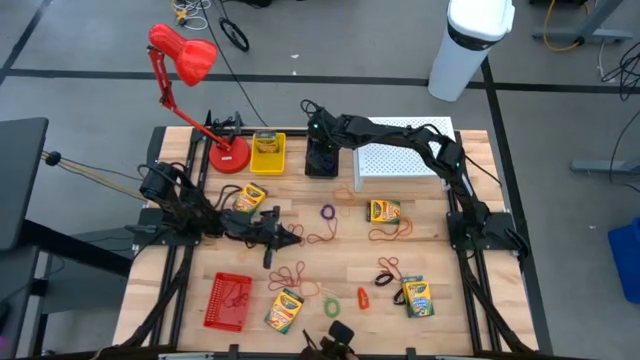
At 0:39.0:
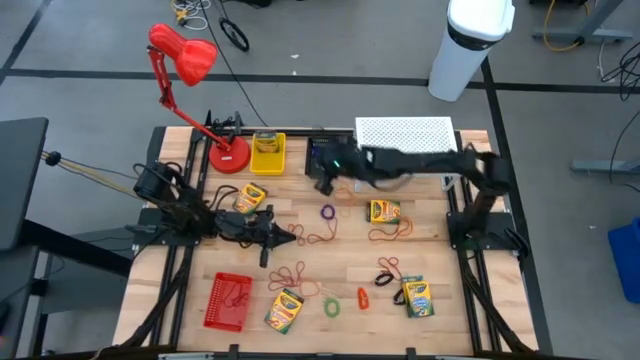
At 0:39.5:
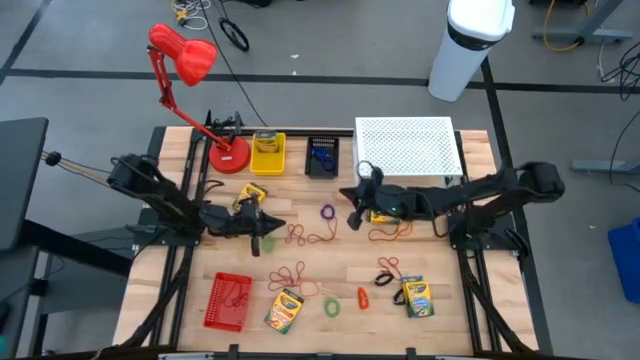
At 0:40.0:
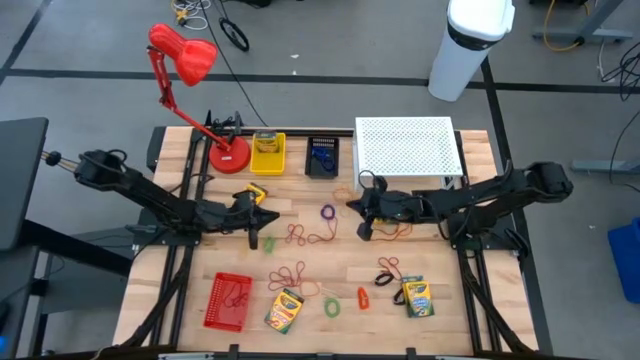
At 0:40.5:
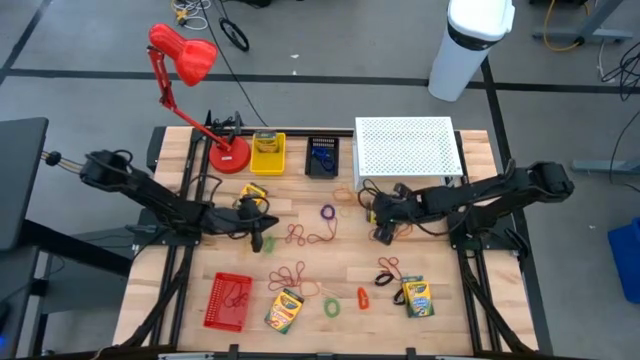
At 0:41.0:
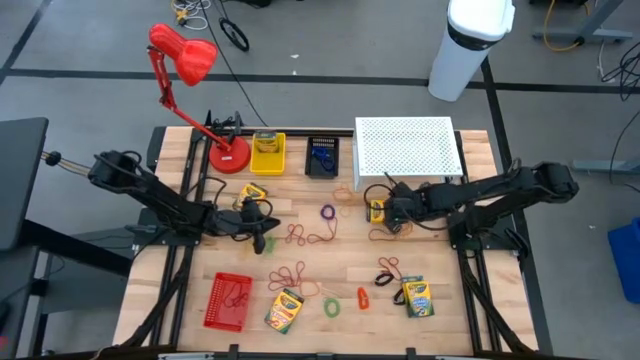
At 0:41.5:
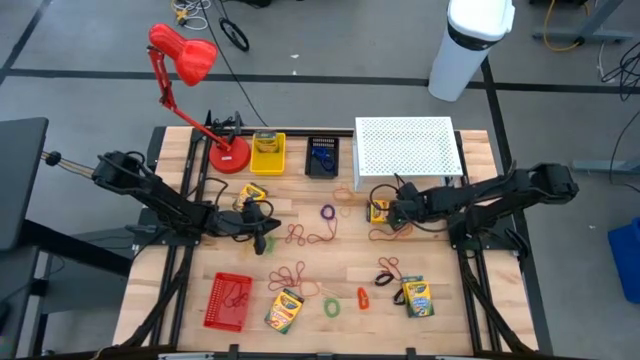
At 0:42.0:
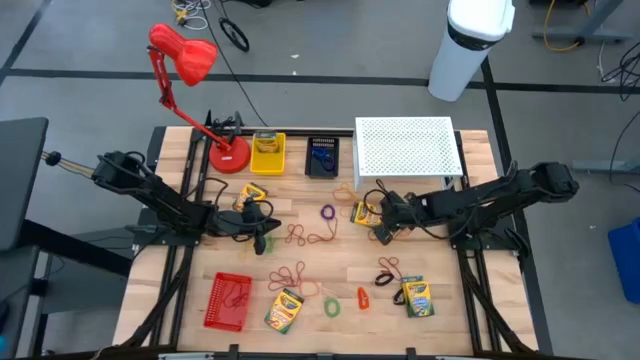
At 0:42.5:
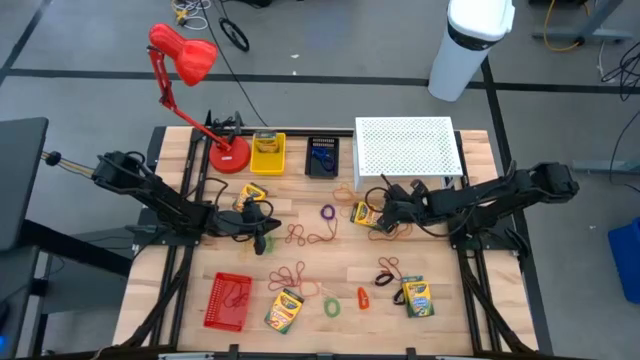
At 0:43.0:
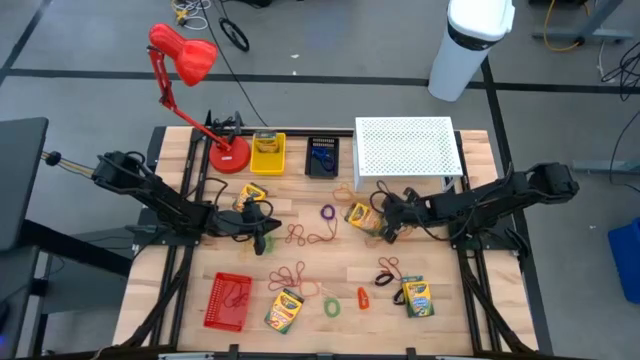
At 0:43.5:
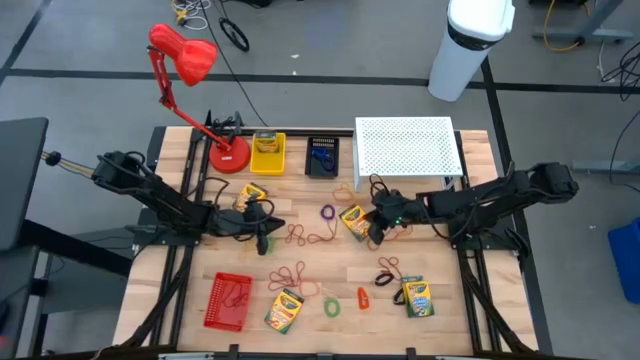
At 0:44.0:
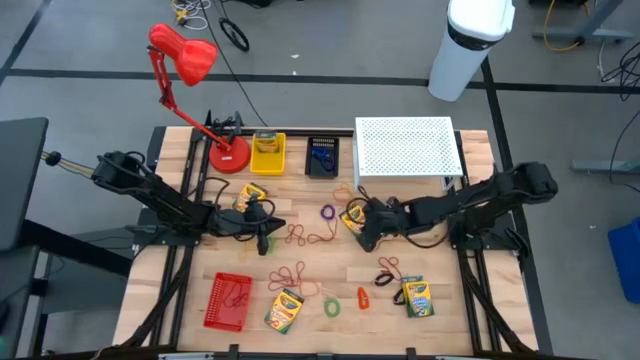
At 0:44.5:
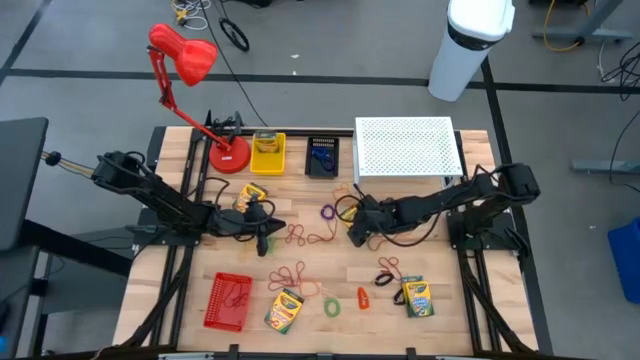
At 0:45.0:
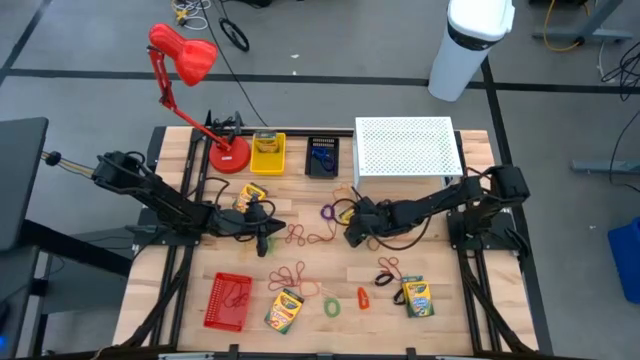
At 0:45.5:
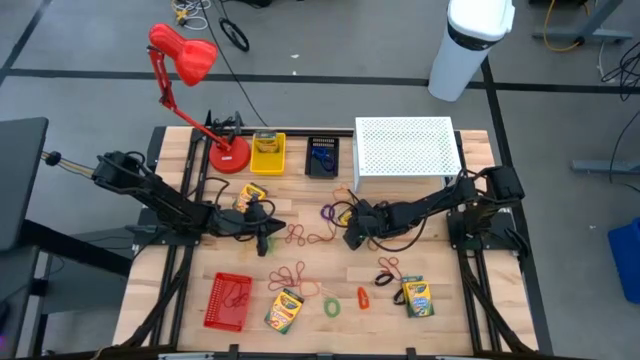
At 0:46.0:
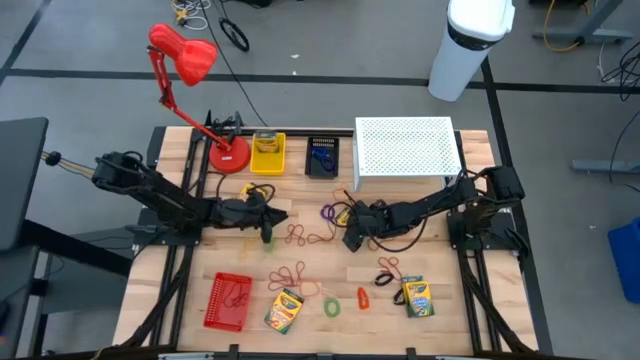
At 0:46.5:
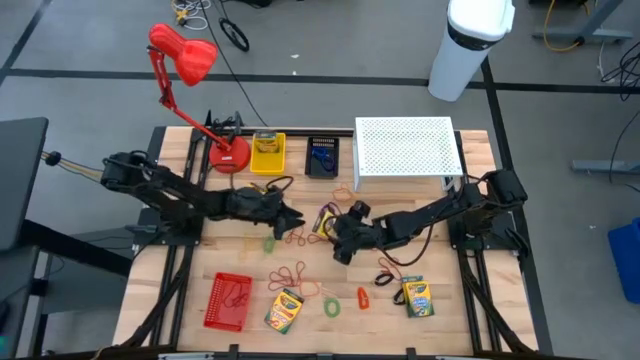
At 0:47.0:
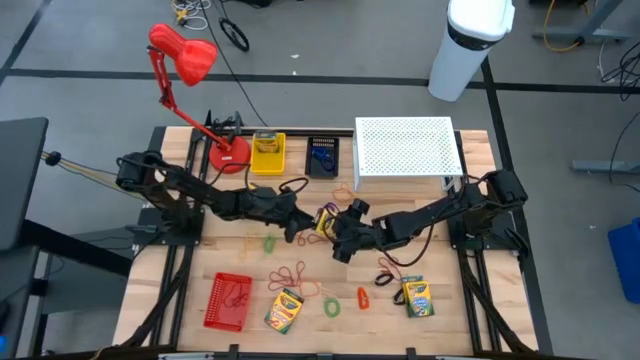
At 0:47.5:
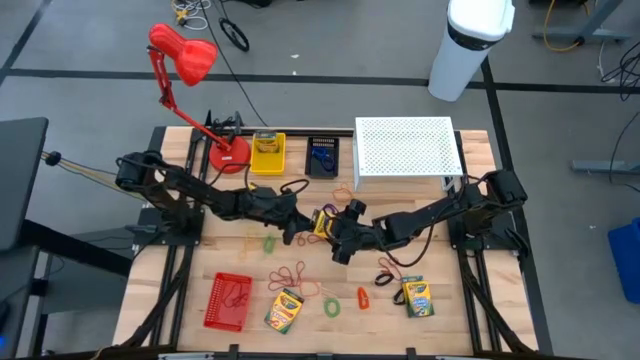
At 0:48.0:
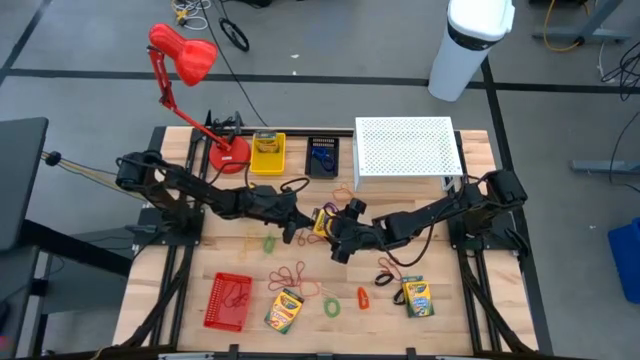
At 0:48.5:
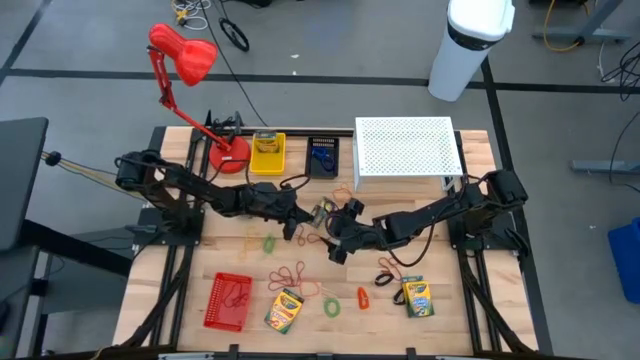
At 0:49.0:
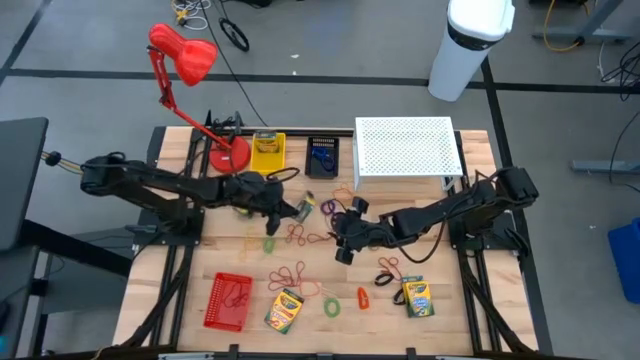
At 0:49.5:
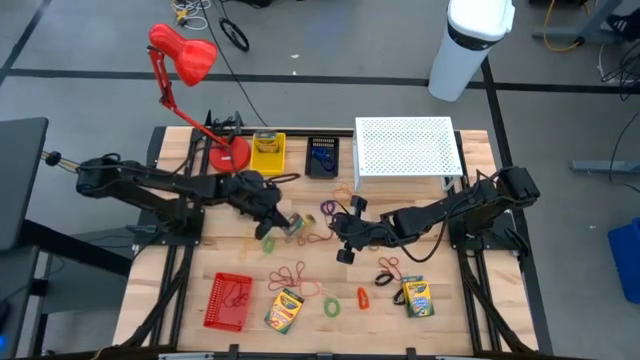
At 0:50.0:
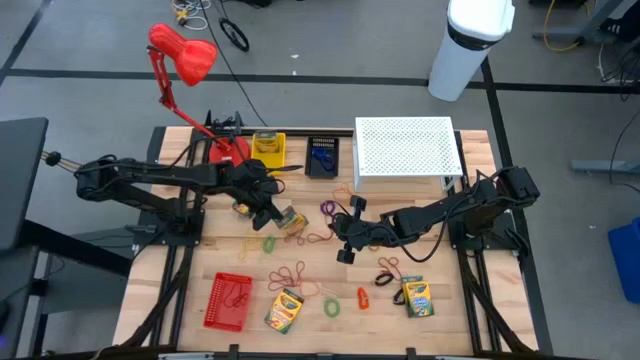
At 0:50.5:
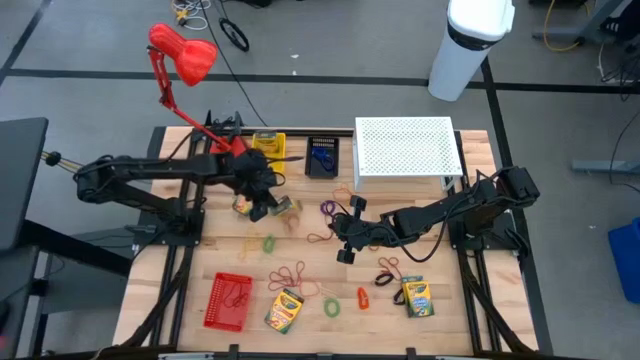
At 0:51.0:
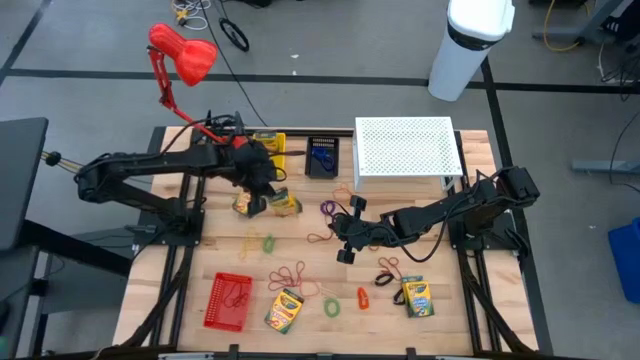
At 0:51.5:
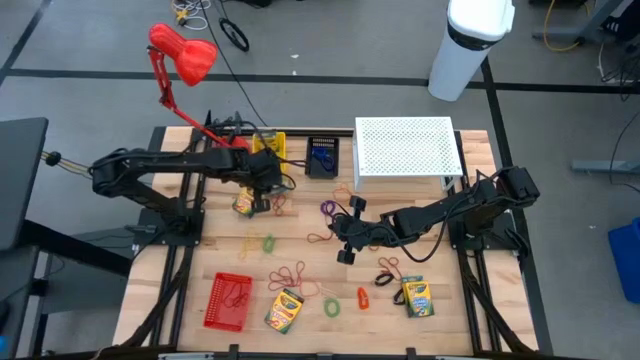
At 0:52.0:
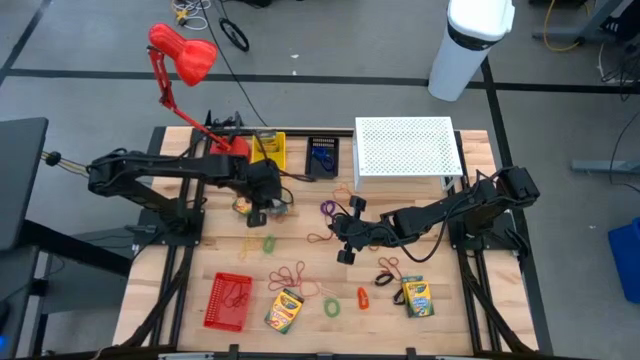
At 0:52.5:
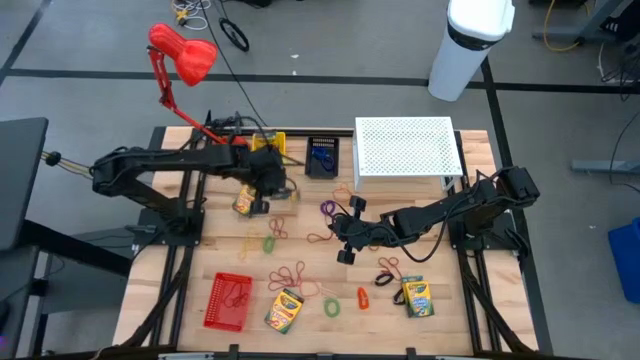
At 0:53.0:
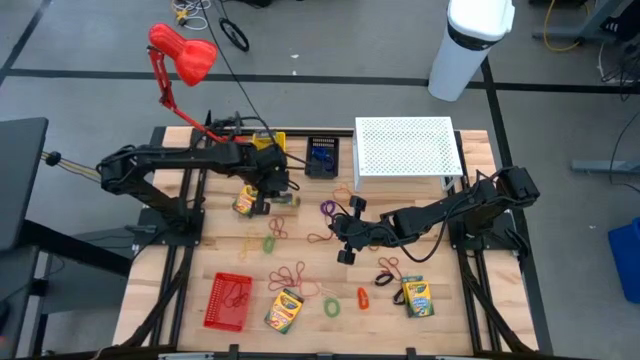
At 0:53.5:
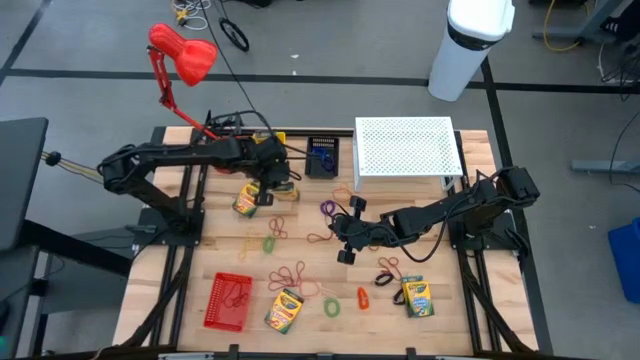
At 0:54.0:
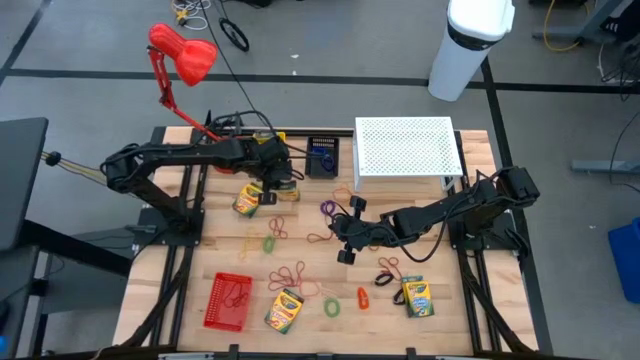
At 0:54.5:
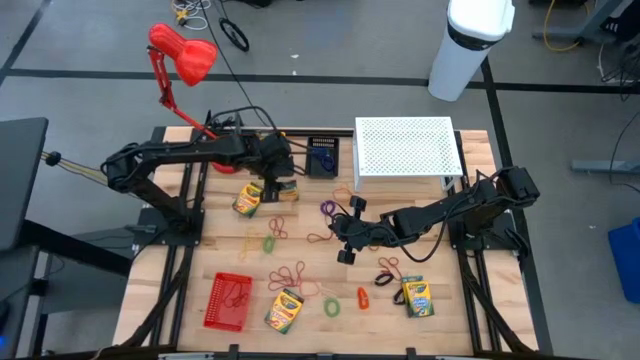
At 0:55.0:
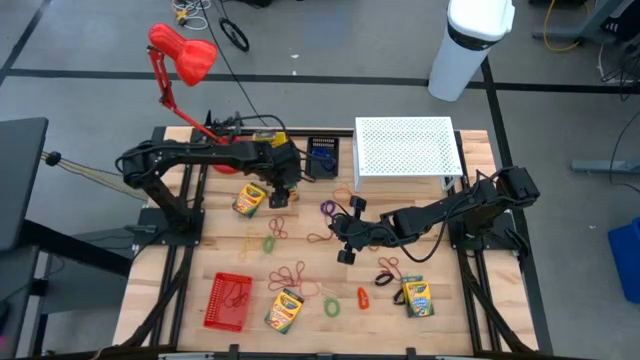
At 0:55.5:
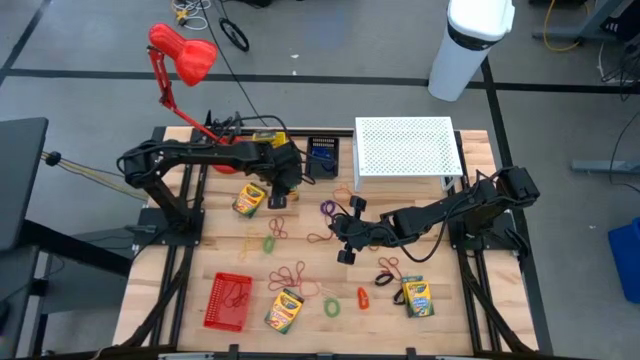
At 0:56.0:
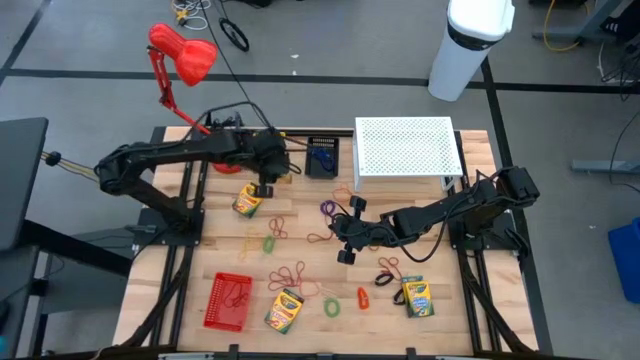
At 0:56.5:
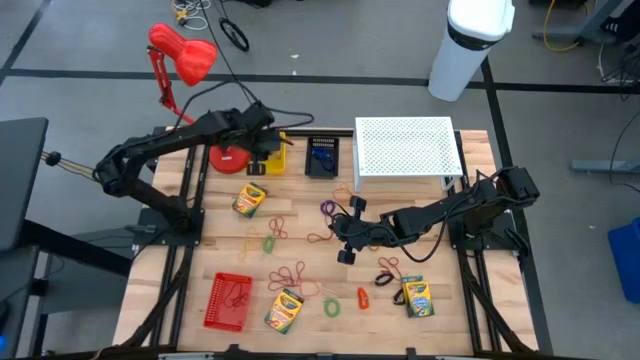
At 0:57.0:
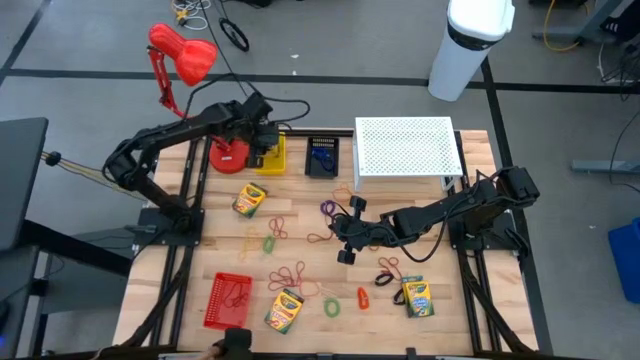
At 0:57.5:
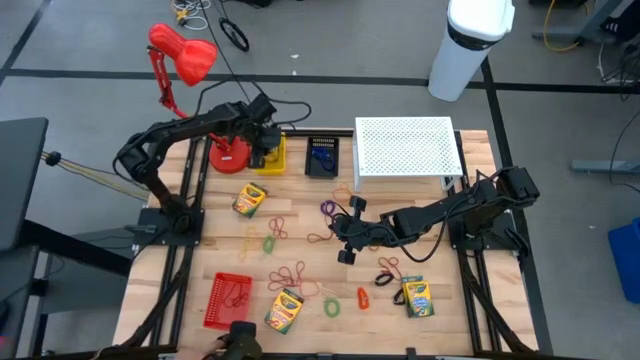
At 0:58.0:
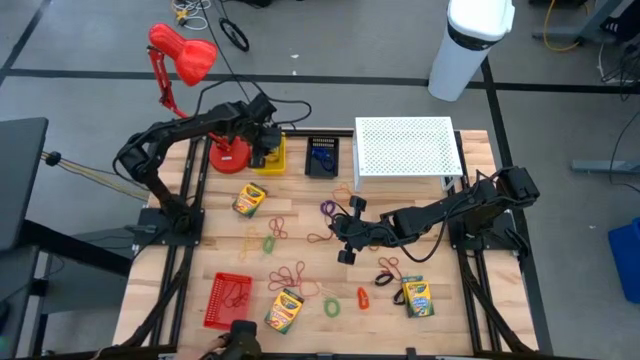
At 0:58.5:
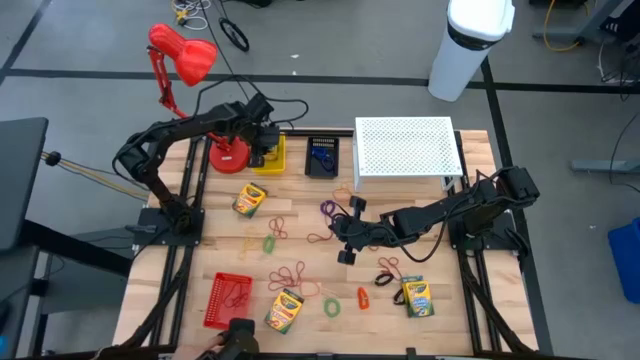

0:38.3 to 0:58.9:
Task: Pick & Place Office Desk Supplies
Put the top right yellow crayon box into the yellow bin
